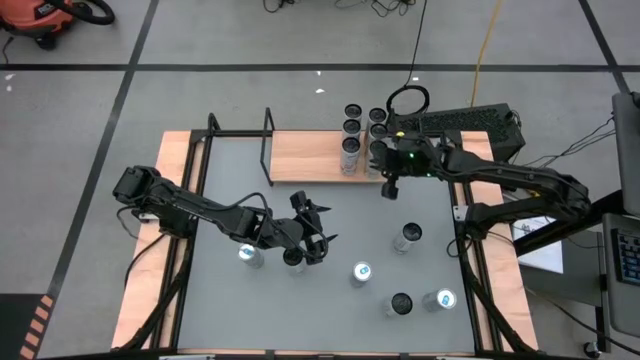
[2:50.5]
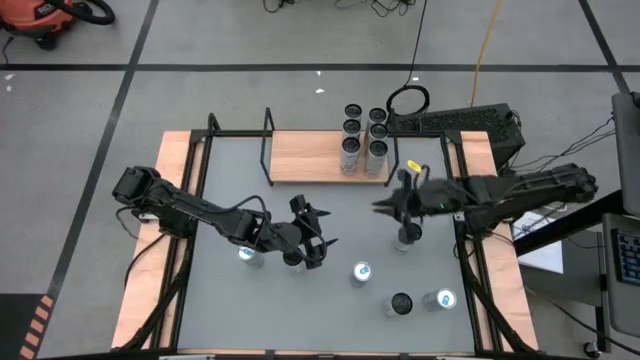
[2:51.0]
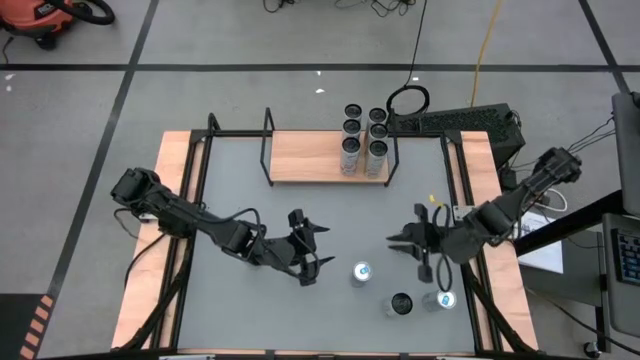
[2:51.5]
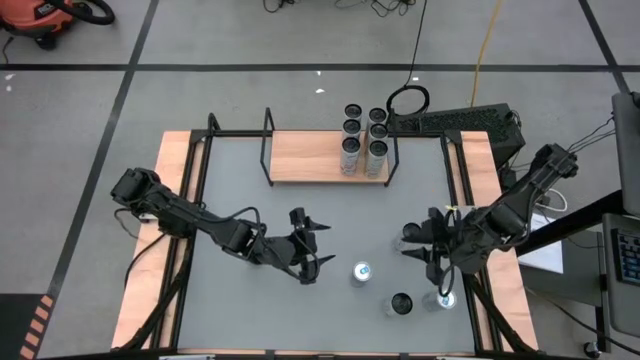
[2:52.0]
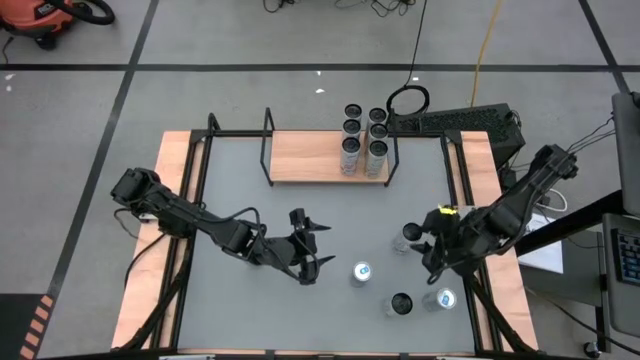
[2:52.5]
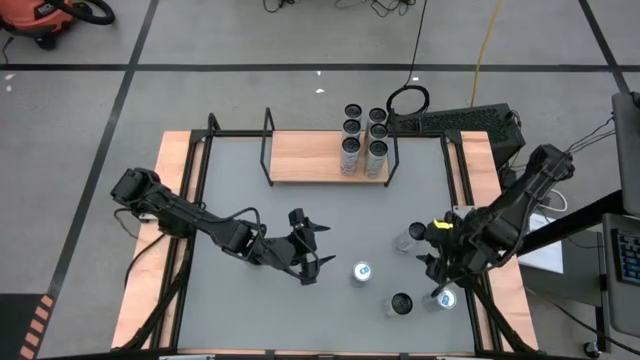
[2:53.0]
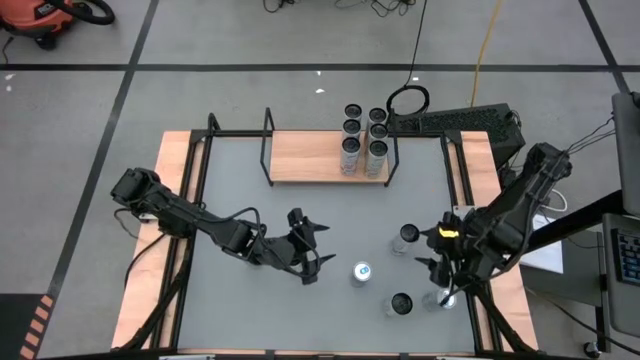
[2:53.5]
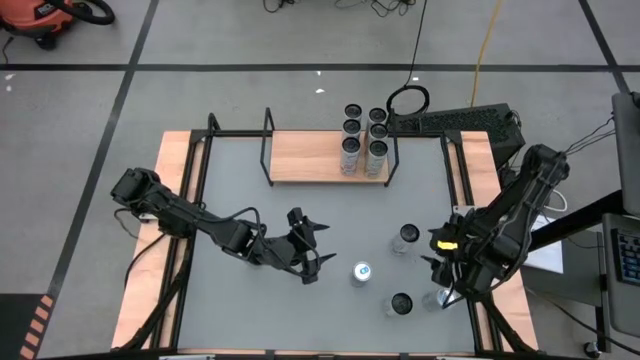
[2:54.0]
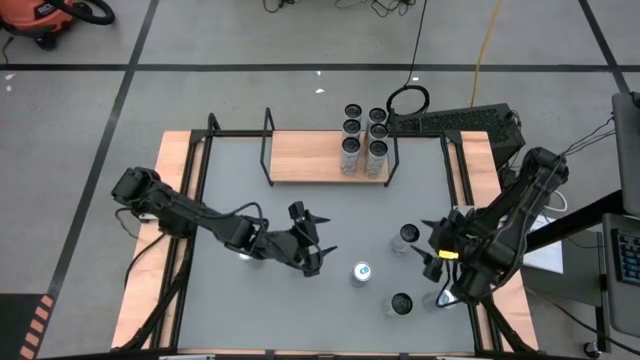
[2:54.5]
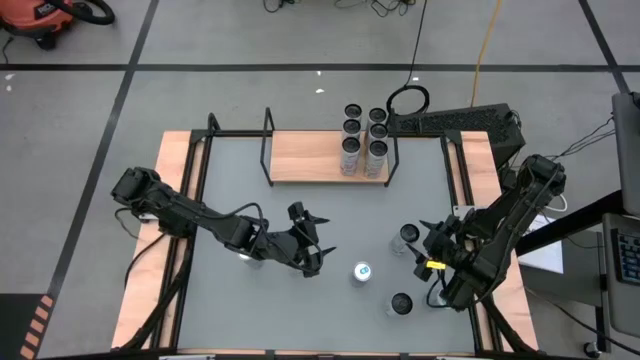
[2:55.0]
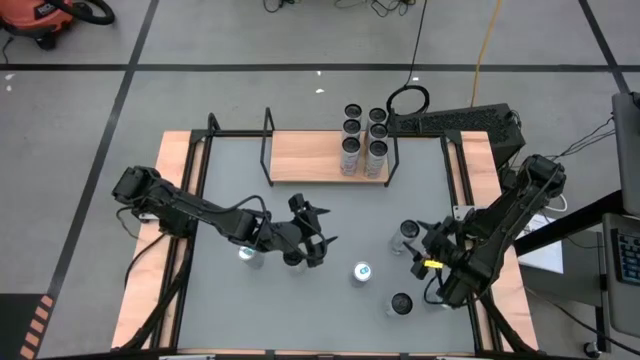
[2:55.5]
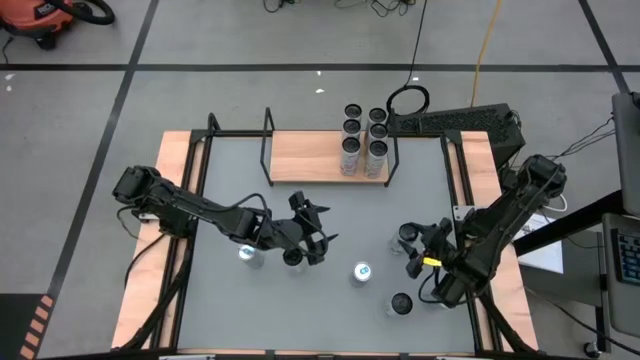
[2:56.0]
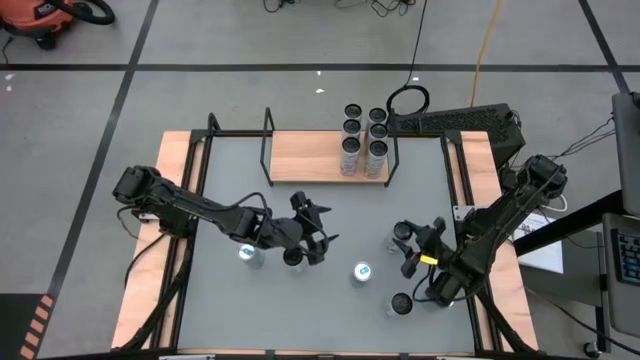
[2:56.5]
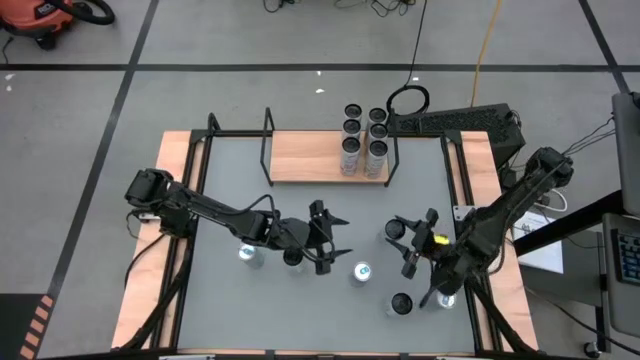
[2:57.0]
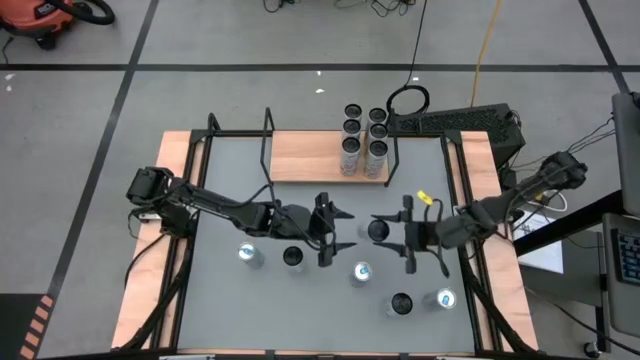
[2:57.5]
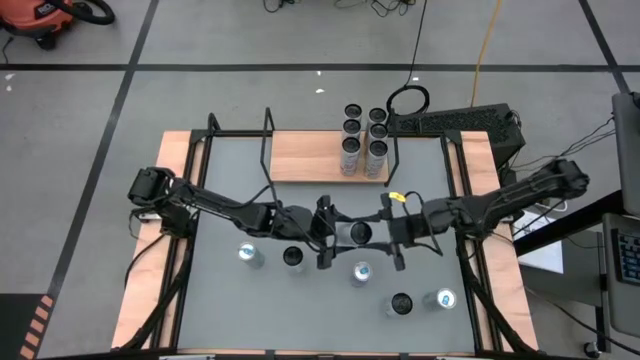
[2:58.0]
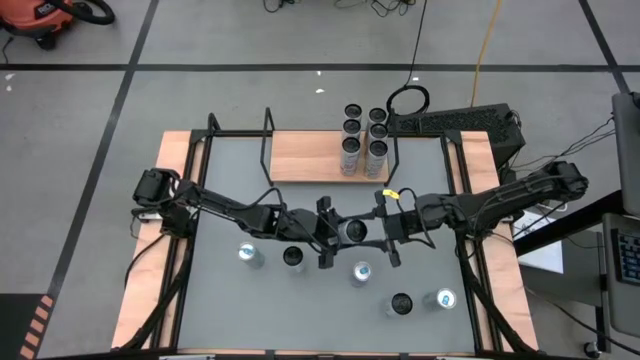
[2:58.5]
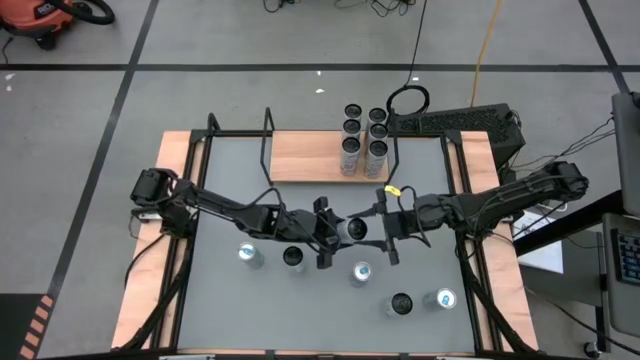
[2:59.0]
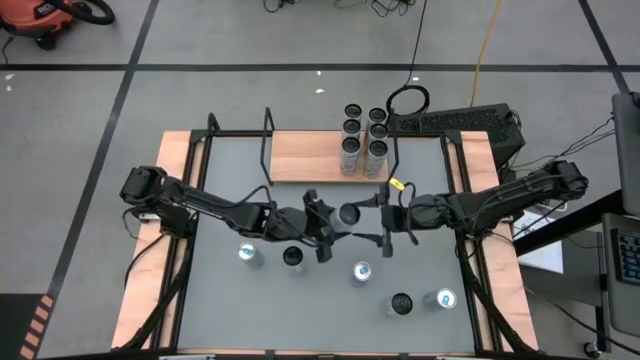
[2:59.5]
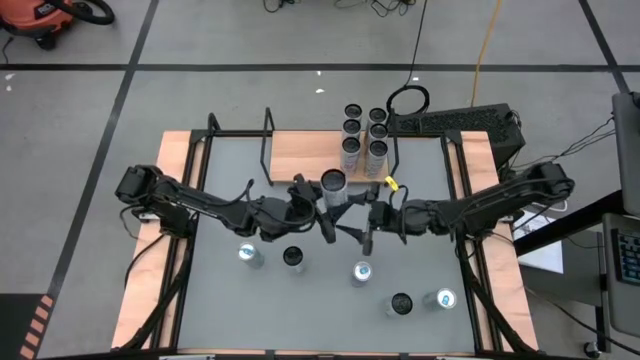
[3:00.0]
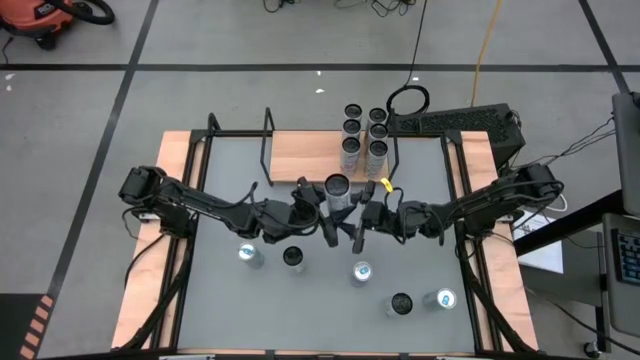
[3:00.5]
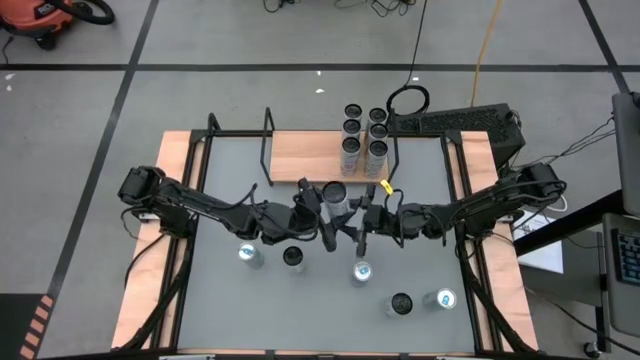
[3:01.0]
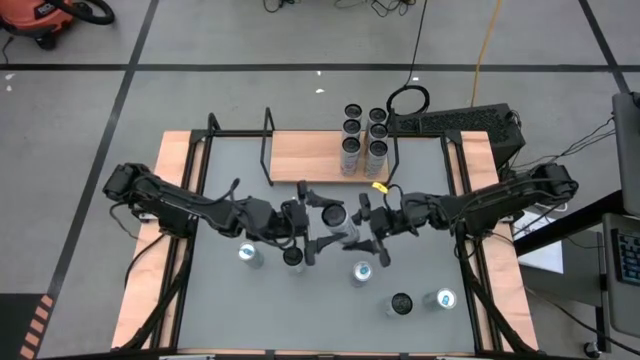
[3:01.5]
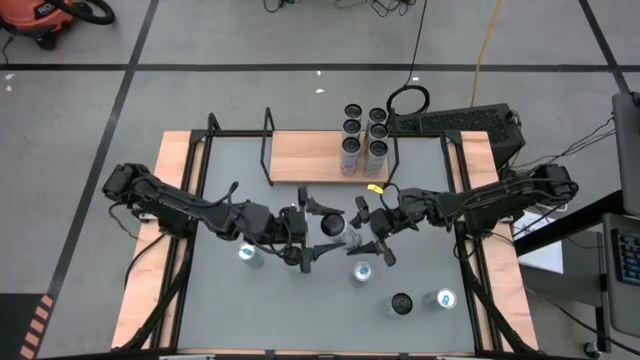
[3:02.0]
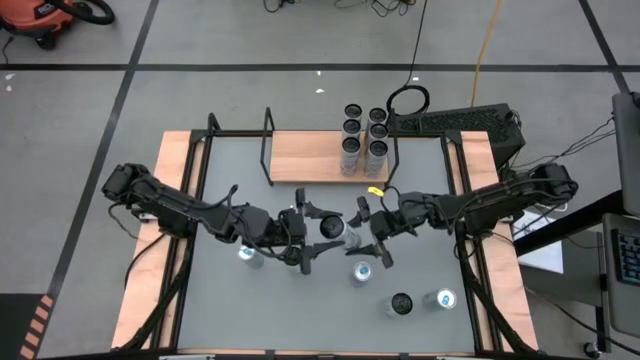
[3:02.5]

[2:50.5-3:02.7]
Task: Place canned beverage on shelf
Put the top white blue soda can on the shelf

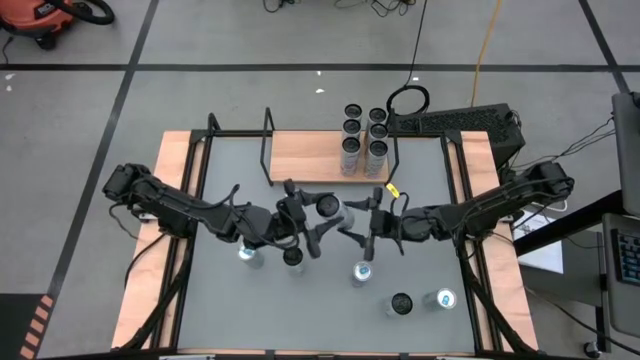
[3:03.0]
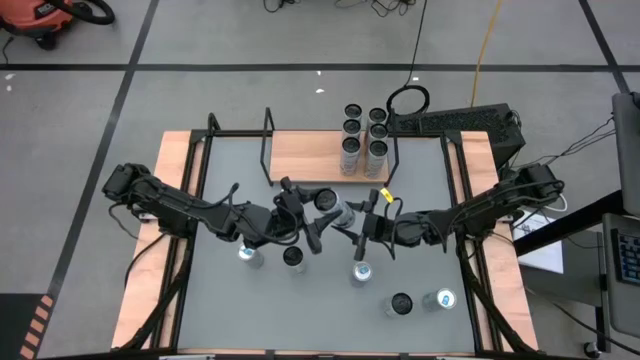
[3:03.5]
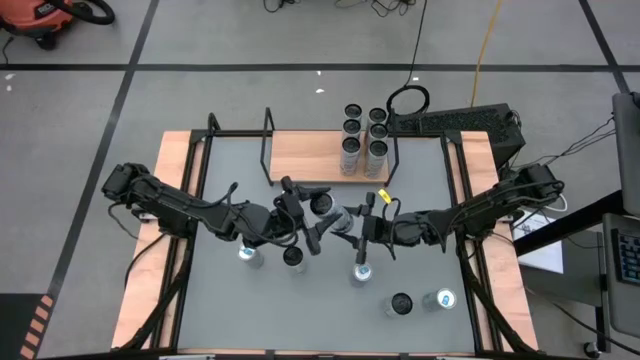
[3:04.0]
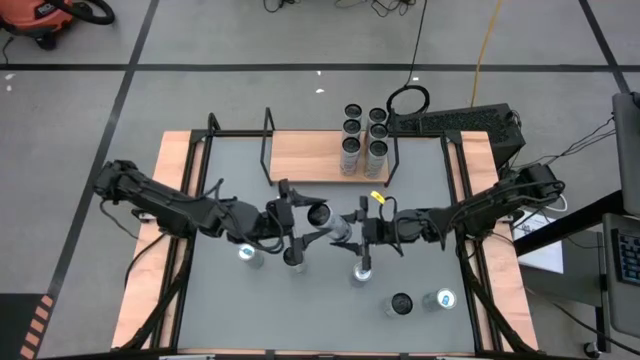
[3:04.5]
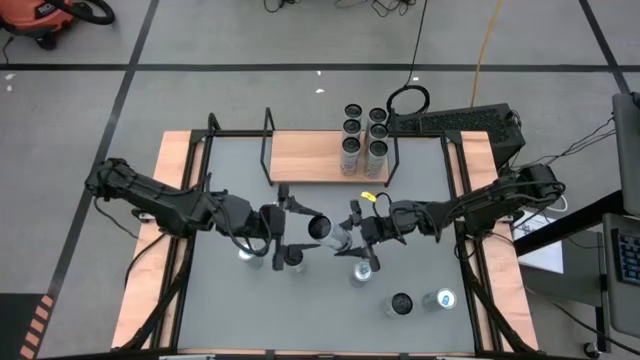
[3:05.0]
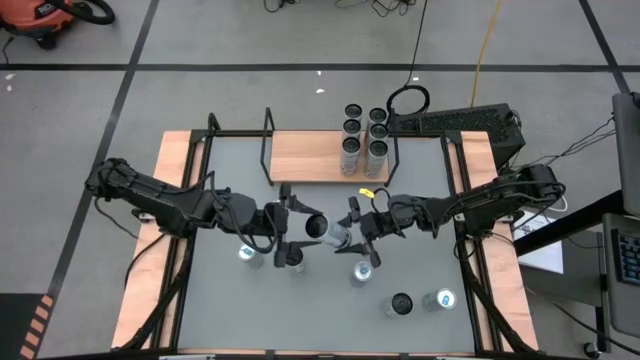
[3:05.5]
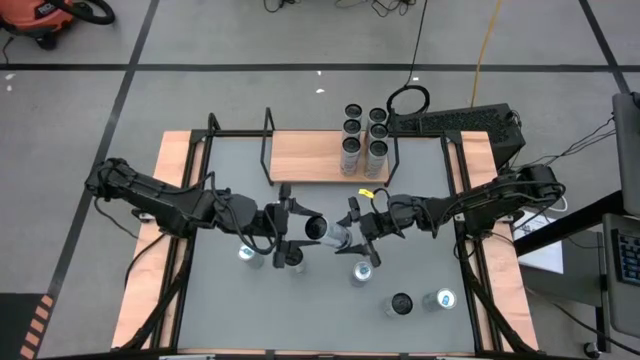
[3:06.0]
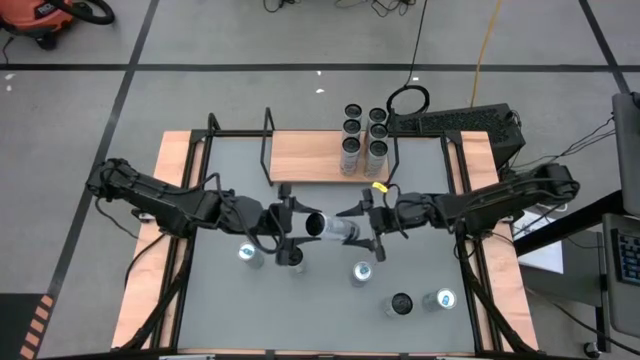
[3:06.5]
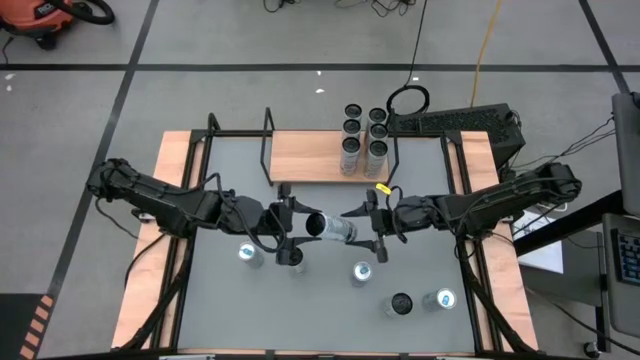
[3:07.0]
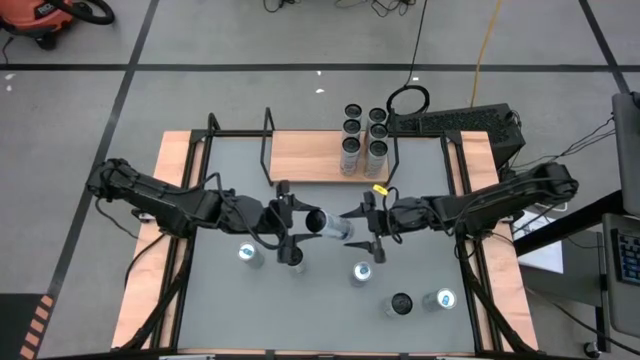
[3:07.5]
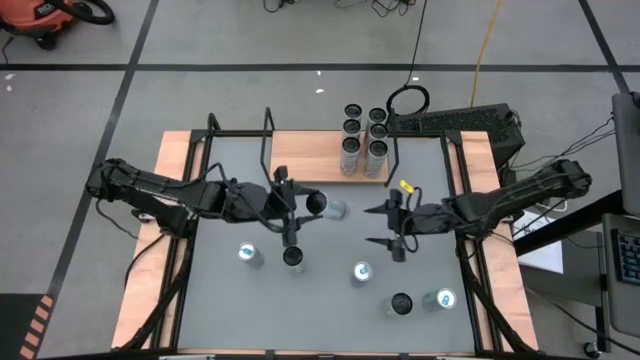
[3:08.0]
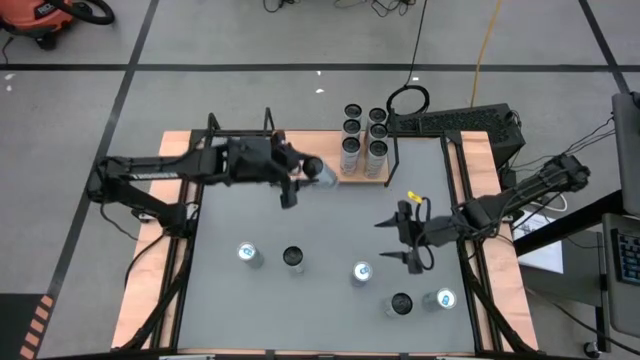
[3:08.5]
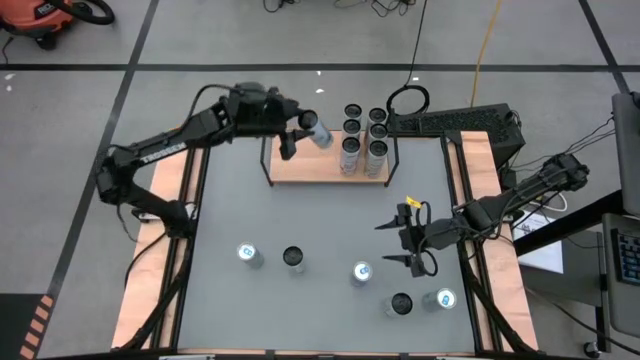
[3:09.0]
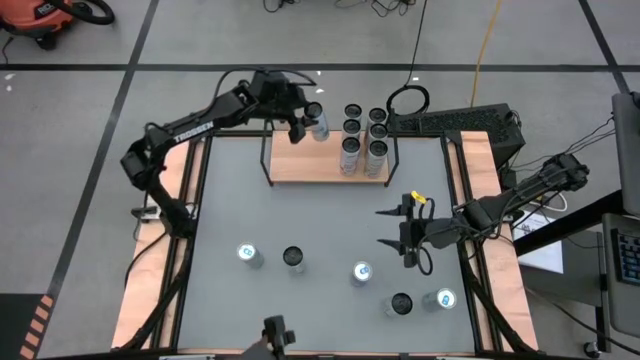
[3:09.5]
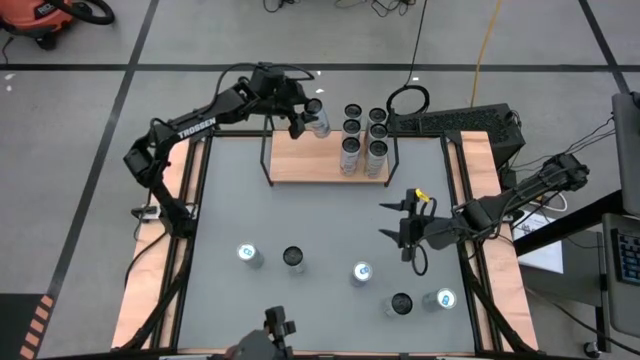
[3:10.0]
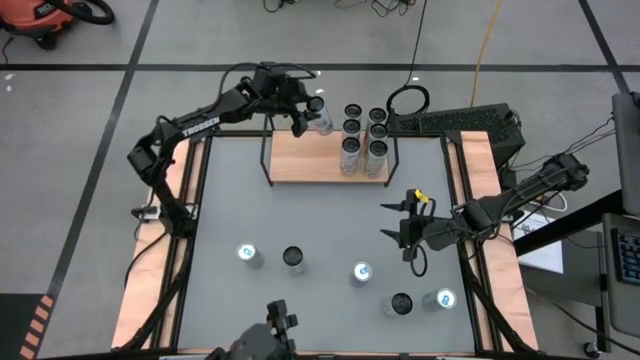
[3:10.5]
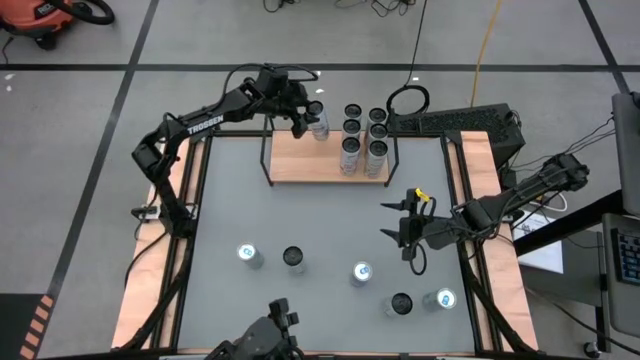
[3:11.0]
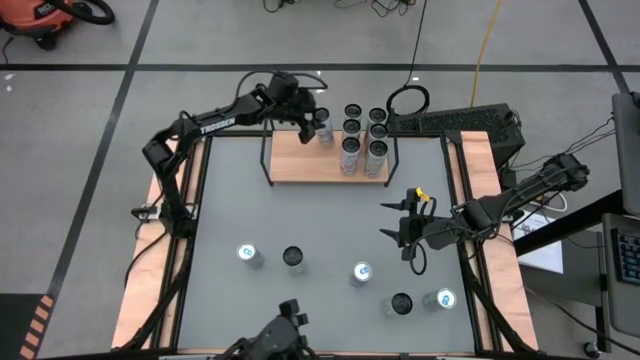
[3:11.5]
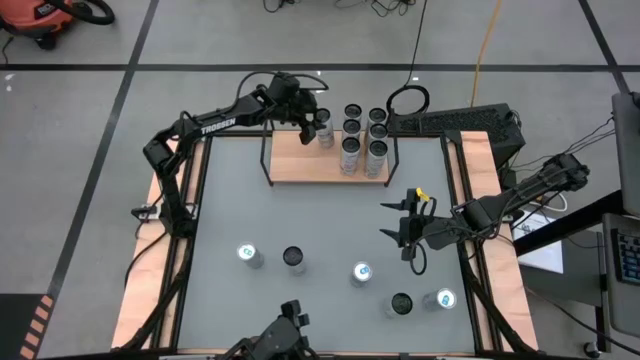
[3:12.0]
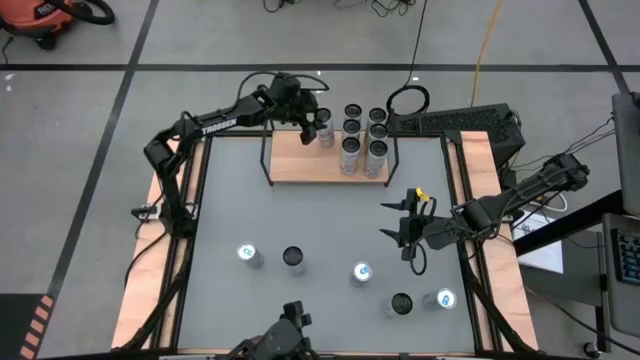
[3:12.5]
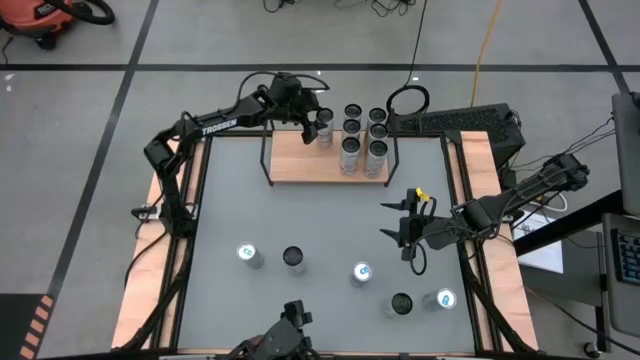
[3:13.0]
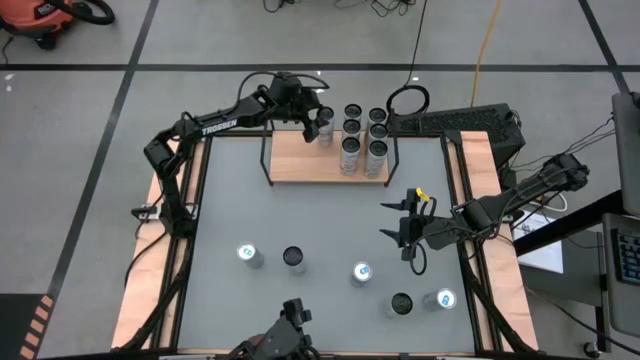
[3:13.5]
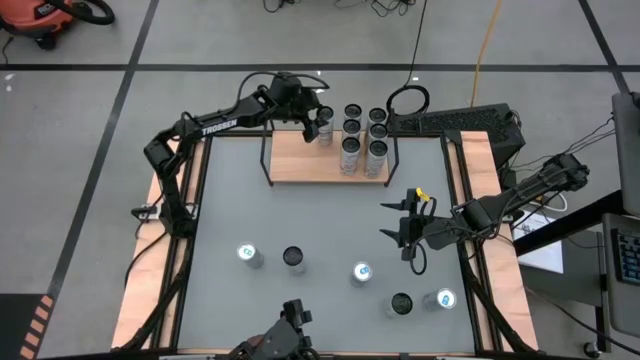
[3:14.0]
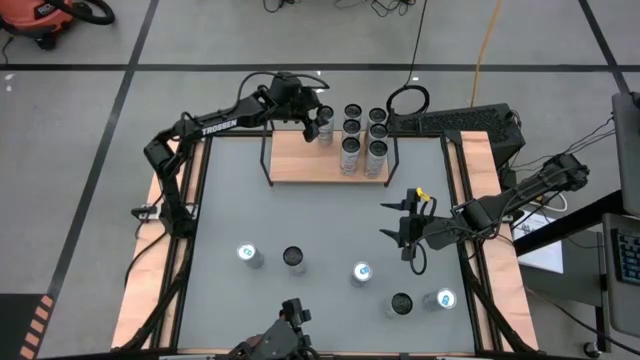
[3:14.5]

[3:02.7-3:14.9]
Put the top white blue soda can on the shelf
